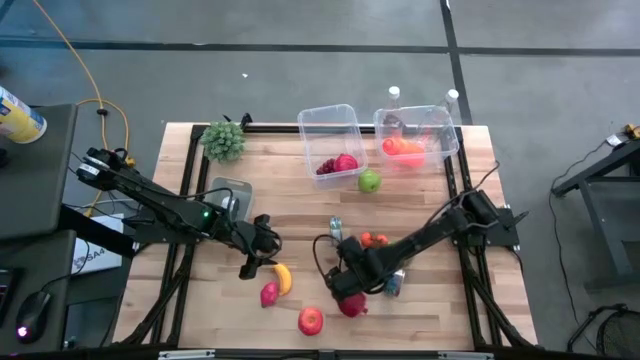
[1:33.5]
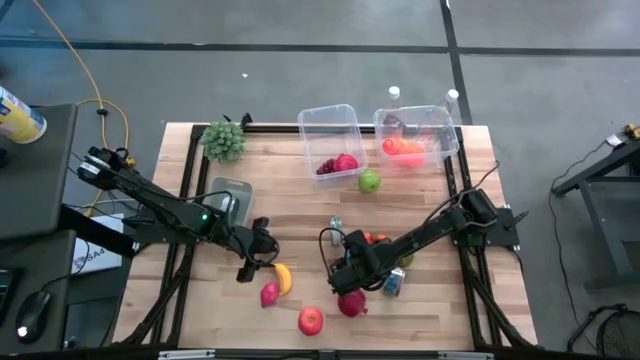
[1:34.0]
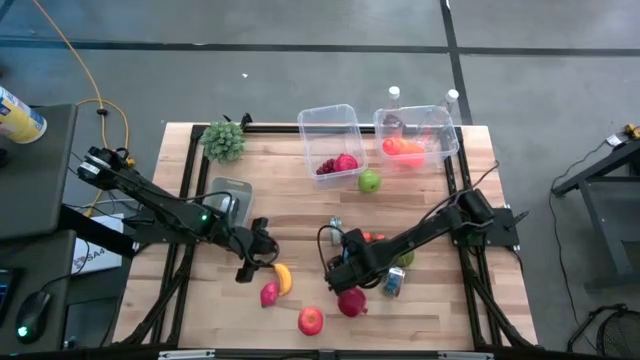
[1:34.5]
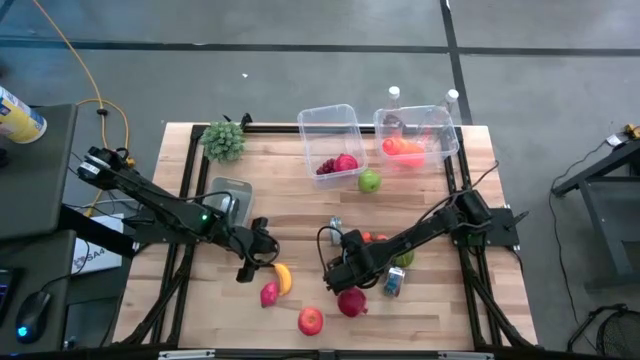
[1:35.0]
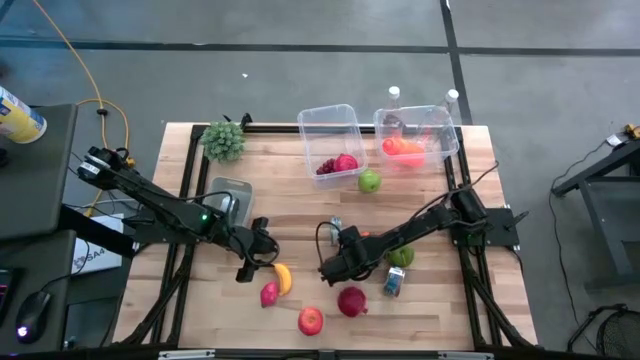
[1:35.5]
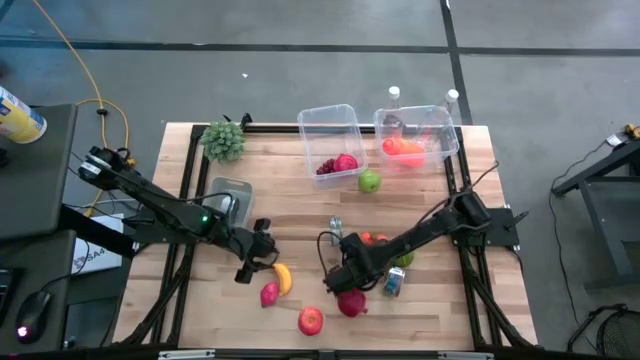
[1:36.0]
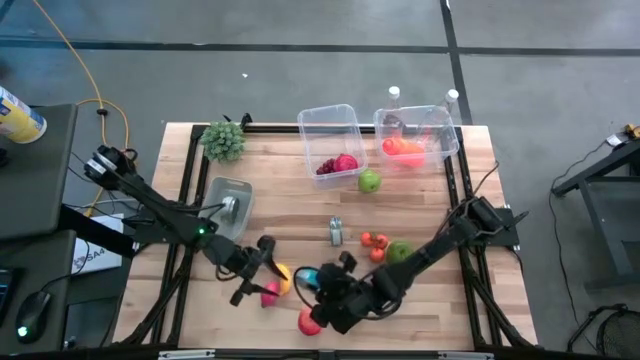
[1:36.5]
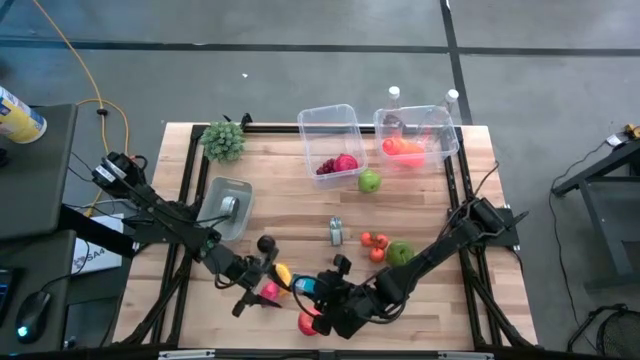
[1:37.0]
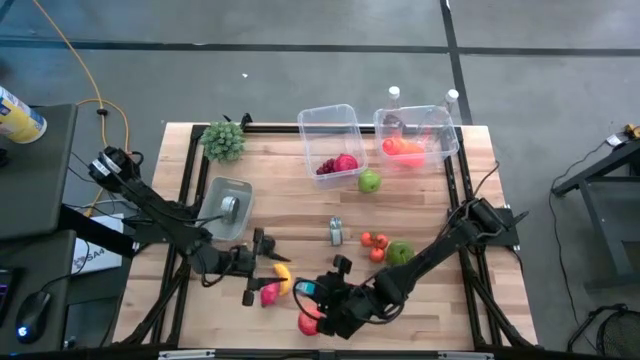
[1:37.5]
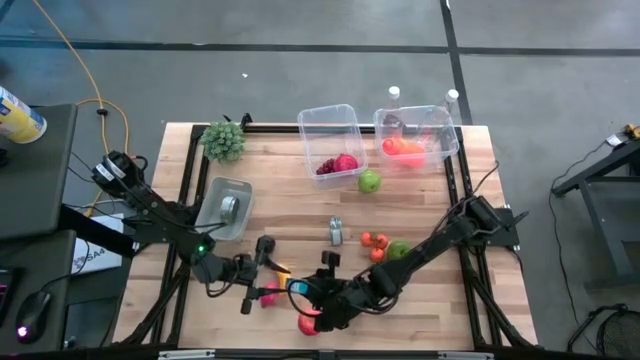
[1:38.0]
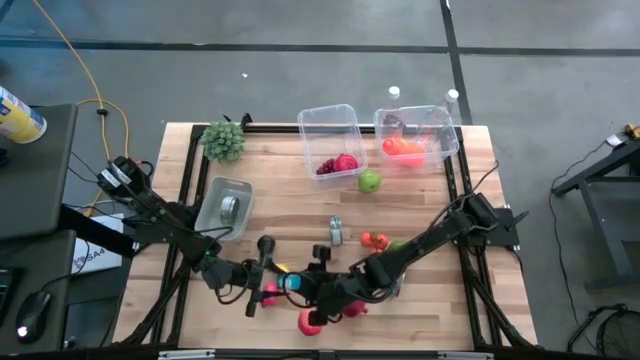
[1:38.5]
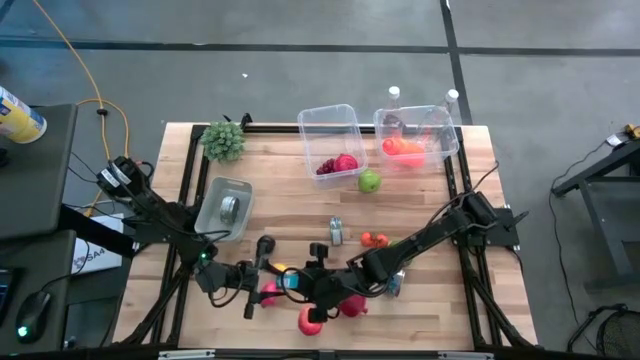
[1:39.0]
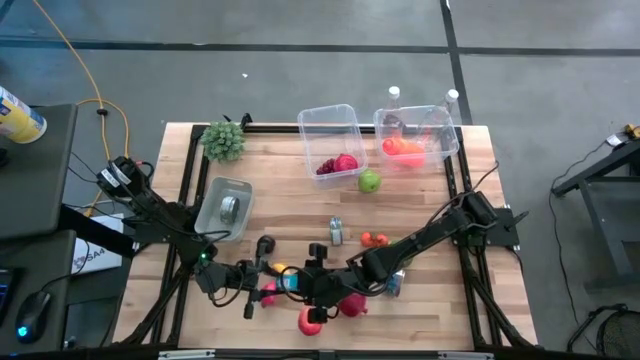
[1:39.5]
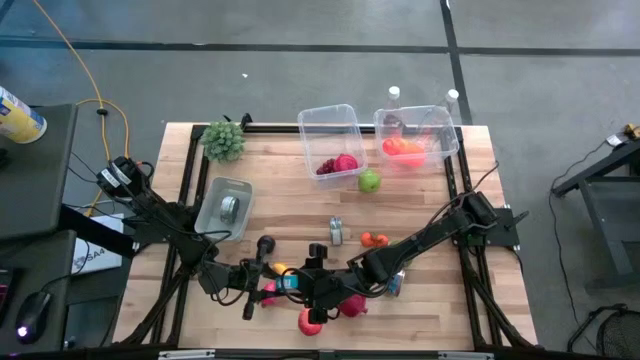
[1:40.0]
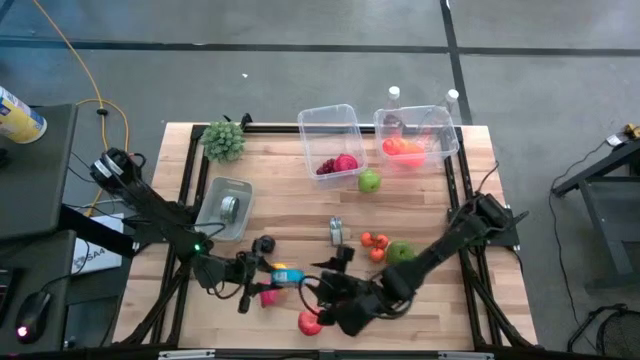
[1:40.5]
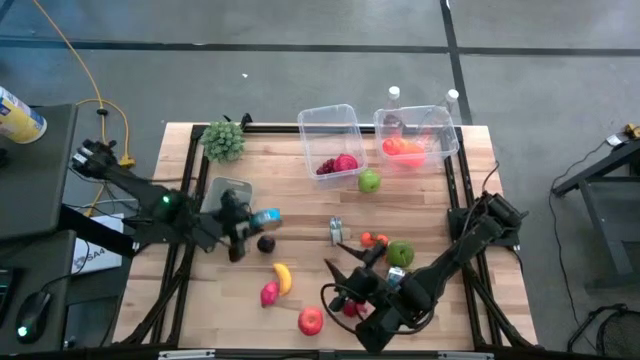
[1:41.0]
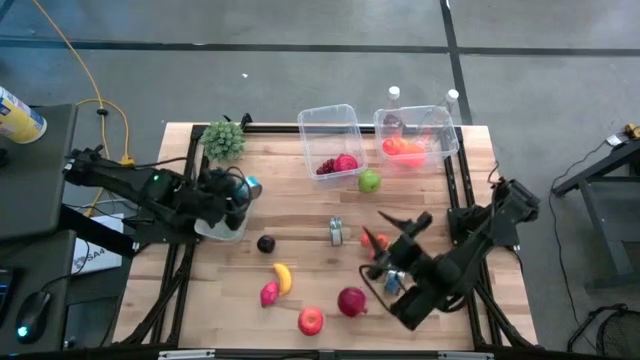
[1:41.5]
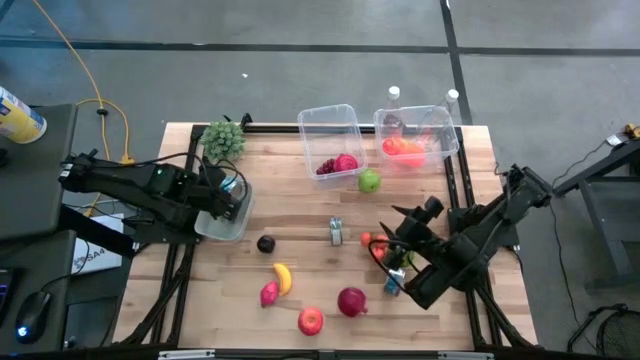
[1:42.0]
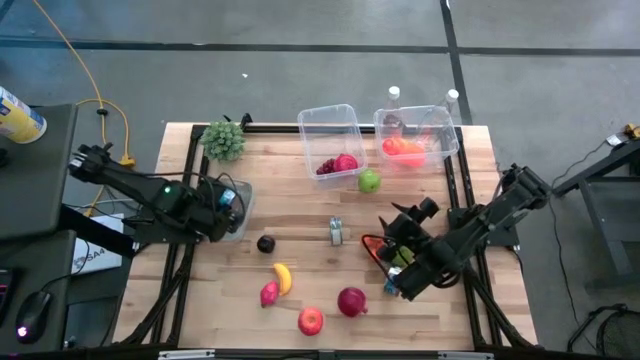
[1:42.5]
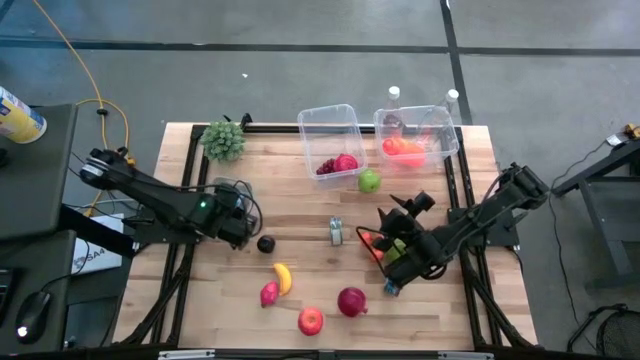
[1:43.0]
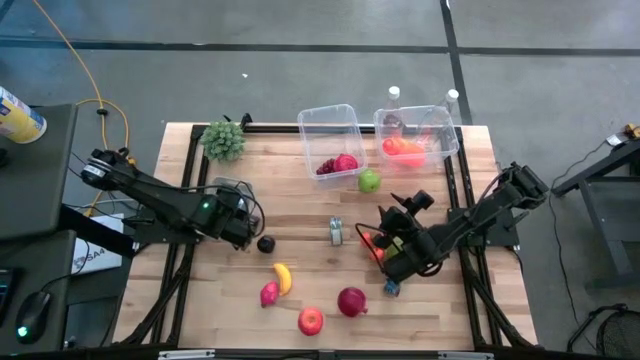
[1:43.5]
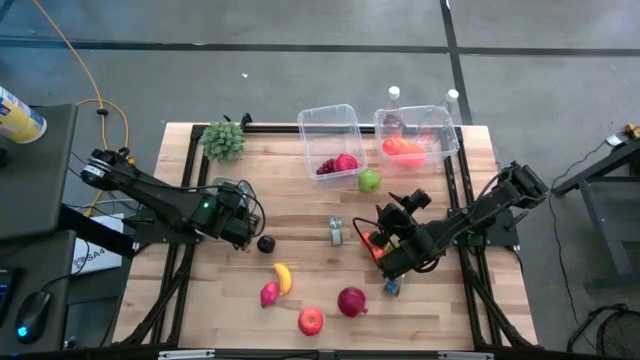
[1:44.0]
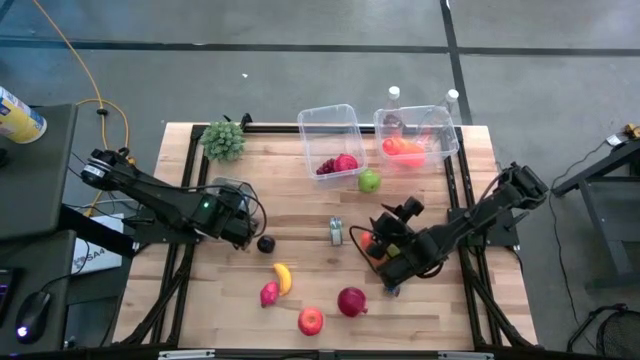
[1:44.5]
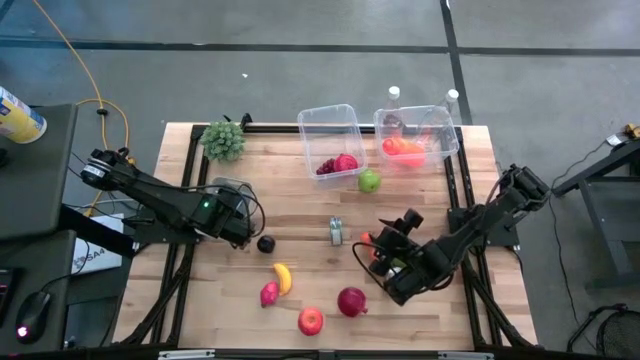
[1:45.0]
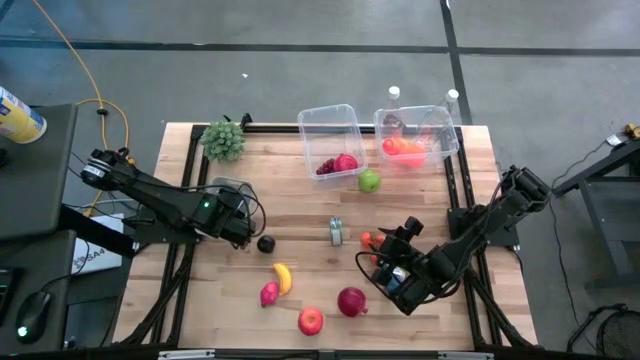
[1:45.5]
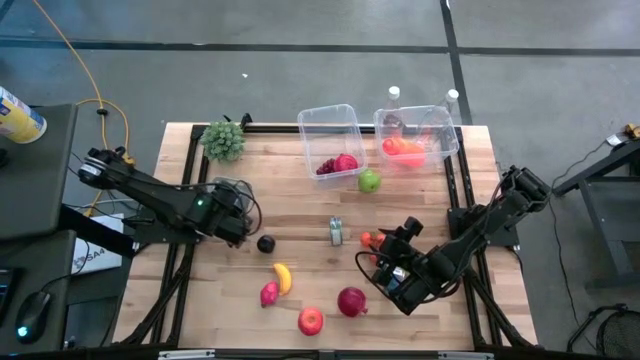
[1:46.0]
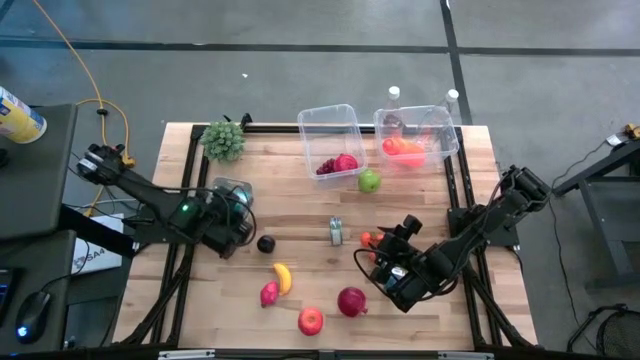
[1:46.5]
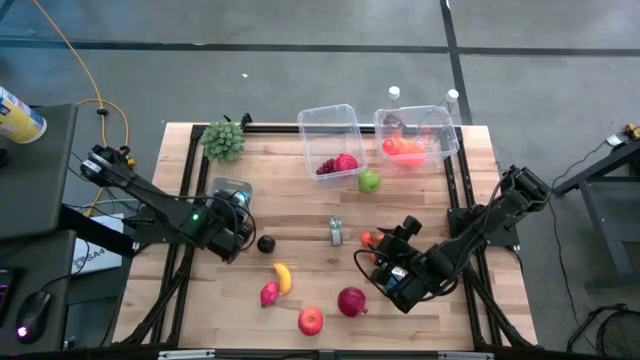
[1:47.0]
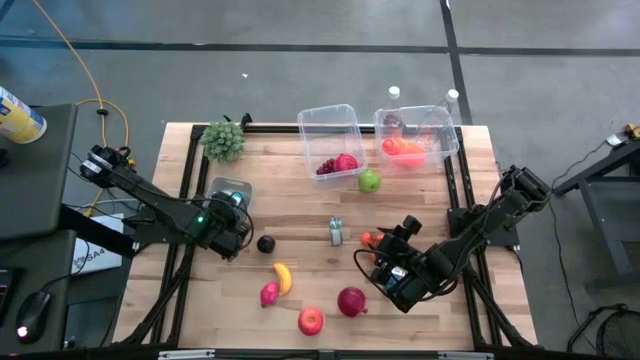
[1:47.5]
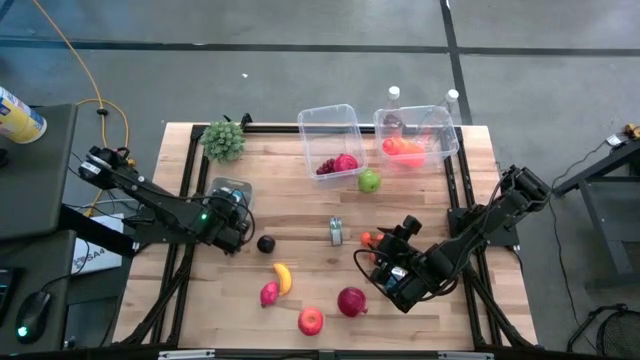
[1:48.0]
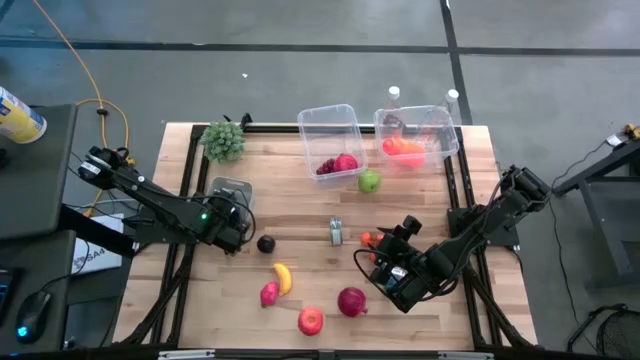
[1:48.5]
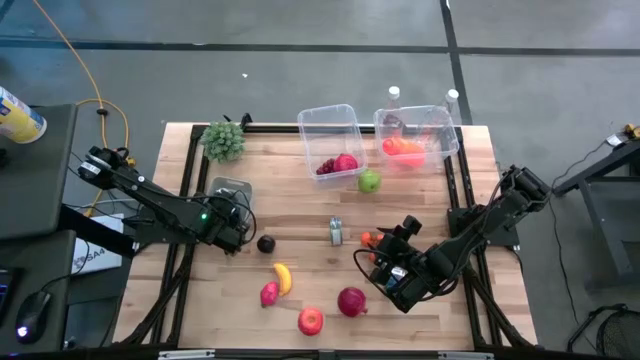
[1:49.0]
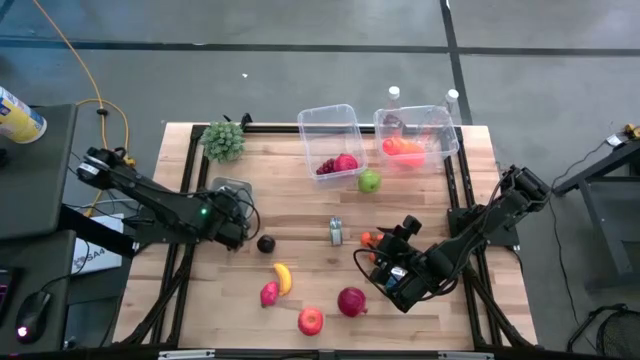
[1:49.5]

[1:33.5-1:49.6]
Task: Pick & Place Food Item
Put the yellow tuna can into the gray bin

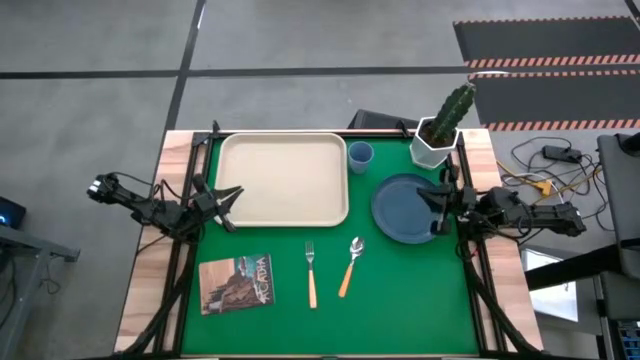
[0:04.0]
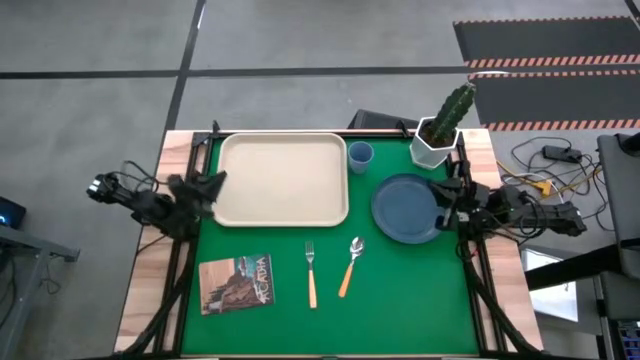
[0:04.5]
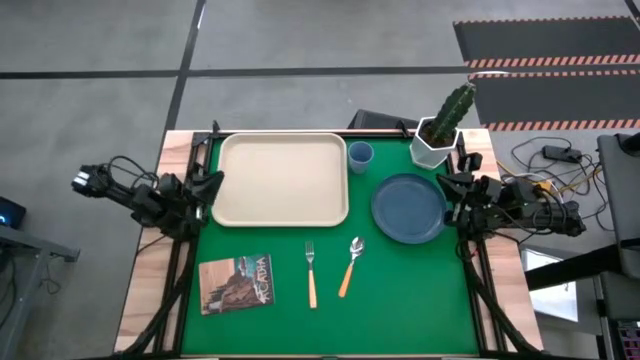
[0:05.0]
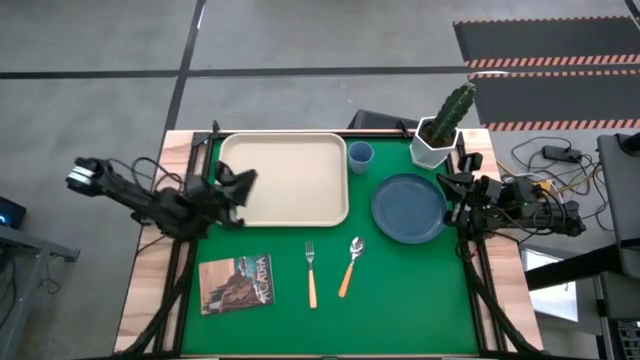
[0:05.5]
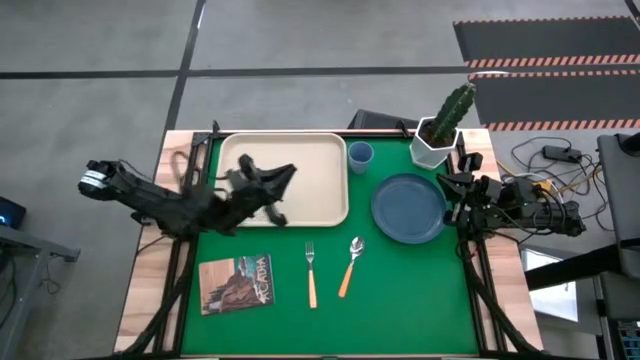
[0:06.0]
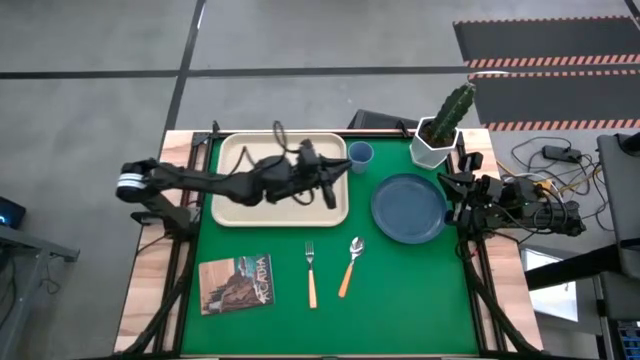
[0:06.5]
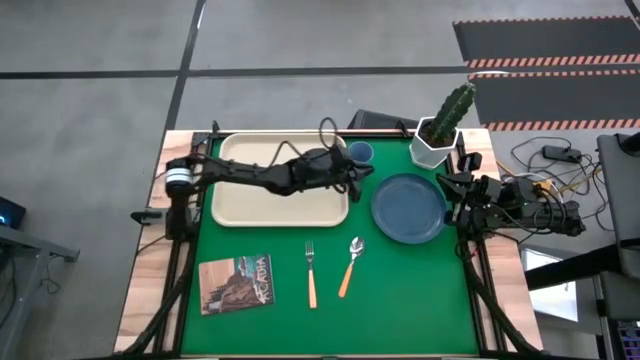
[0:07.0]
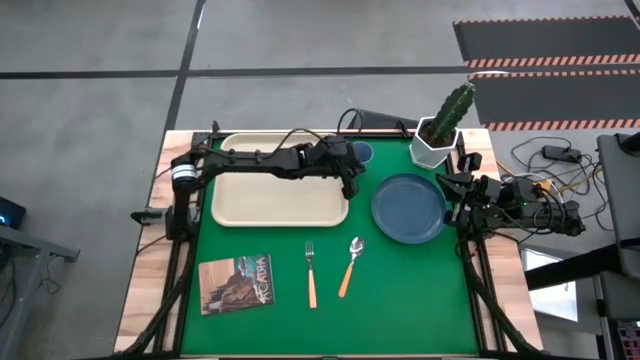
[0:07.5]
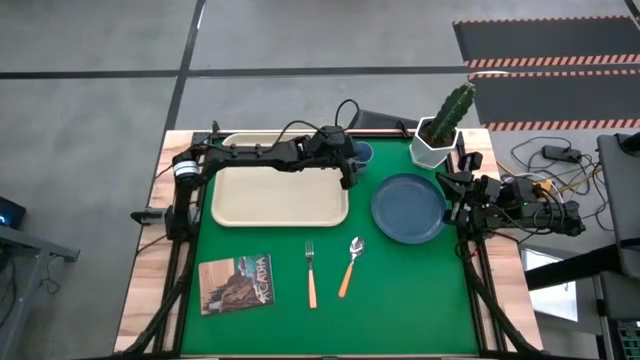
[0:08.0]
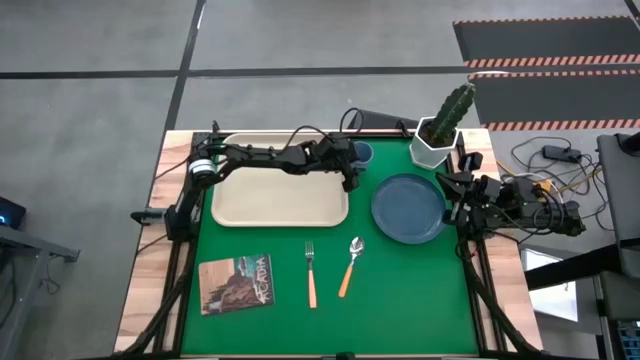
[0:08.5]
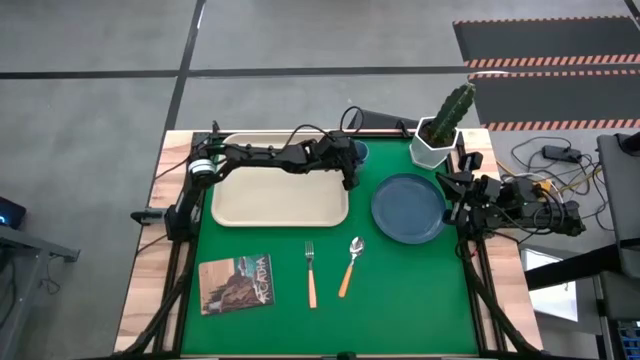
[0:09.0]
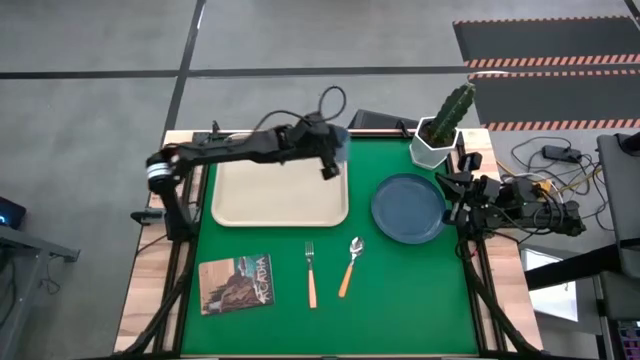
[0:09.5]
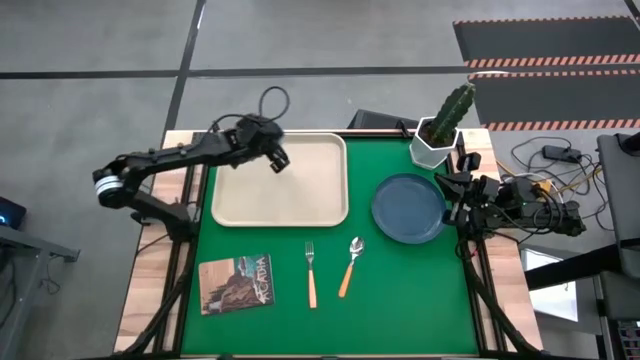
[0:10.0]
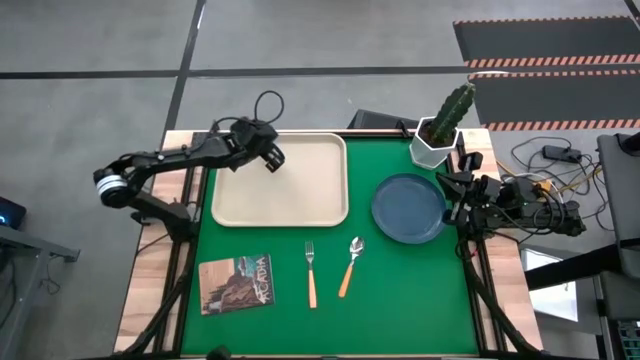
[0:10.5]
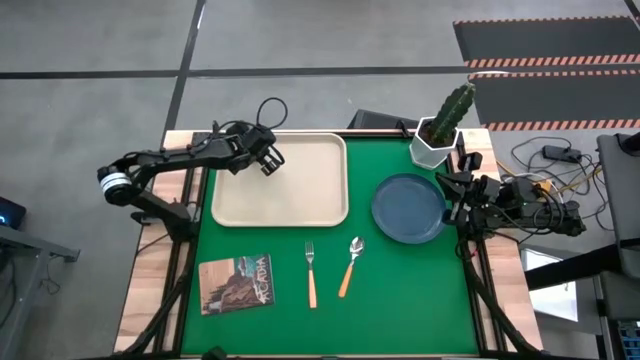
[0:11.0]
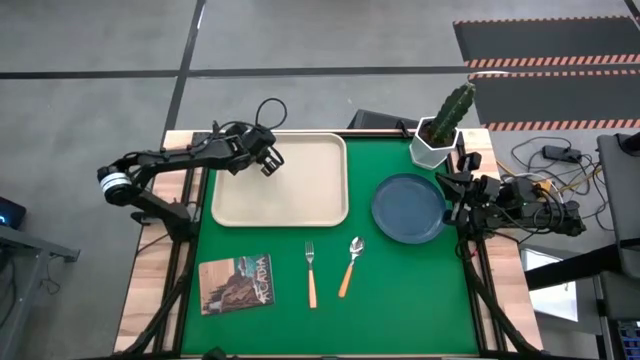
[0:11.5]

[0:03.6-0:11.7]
Task: Pick and place plate/cup/fork/spoon on tray
Put the blue cup on the white tray
